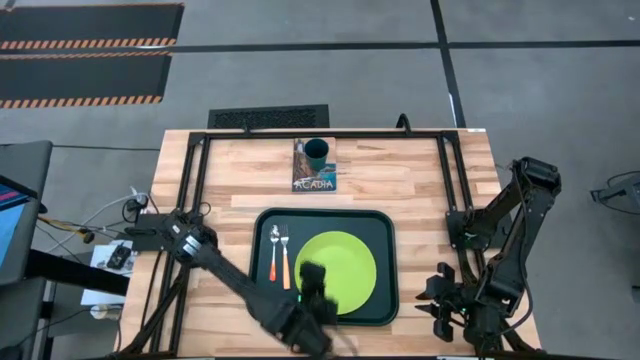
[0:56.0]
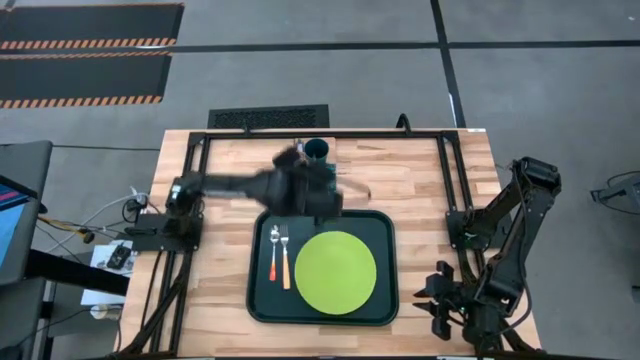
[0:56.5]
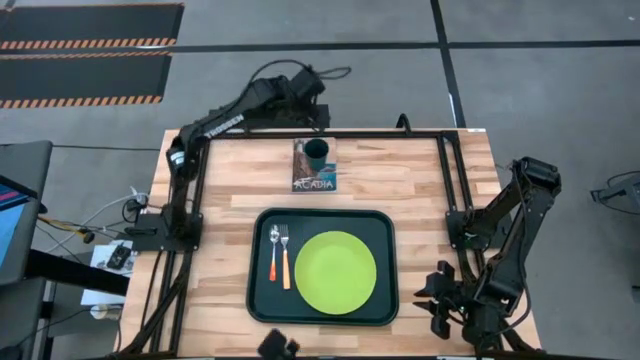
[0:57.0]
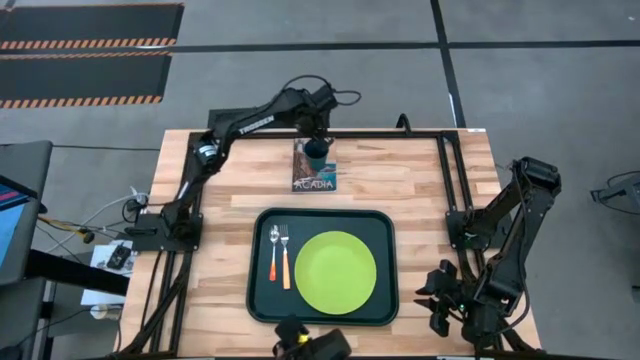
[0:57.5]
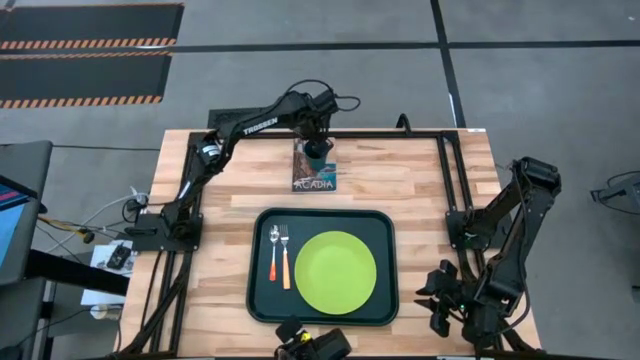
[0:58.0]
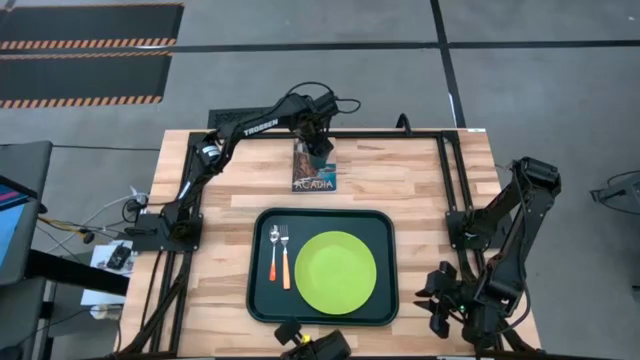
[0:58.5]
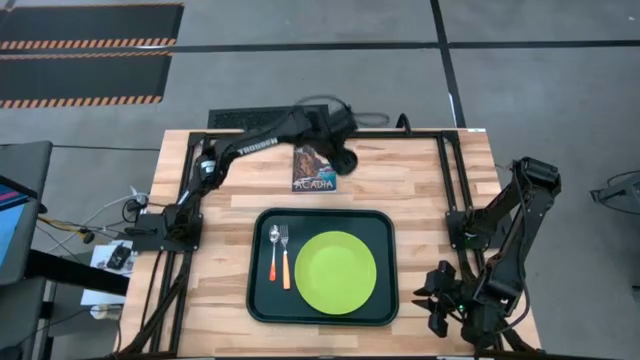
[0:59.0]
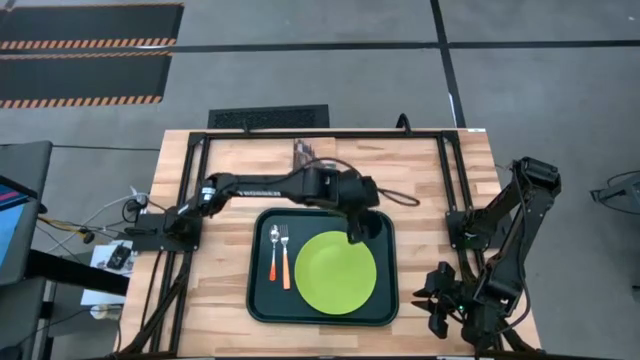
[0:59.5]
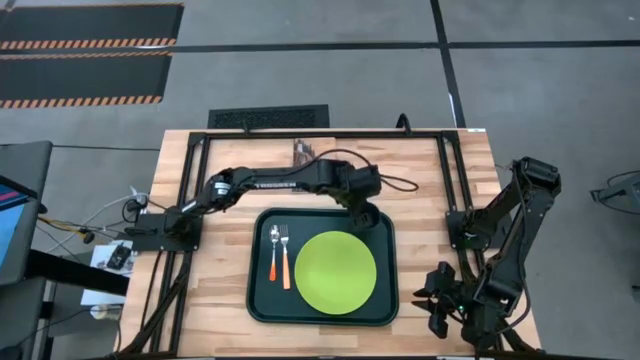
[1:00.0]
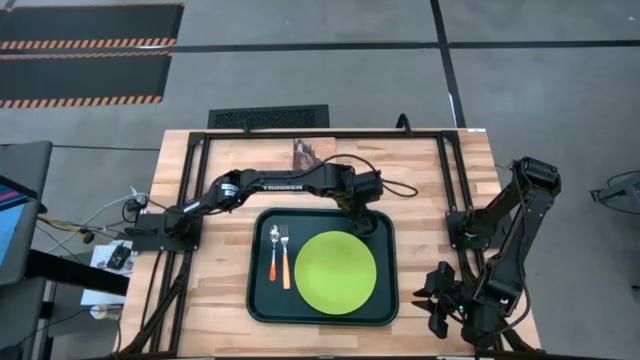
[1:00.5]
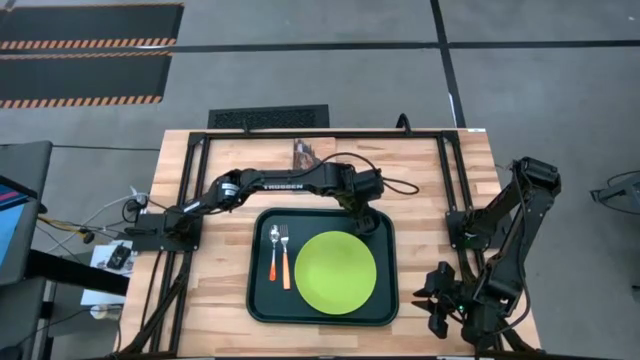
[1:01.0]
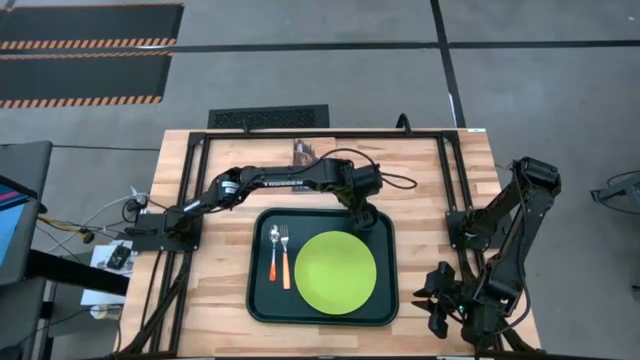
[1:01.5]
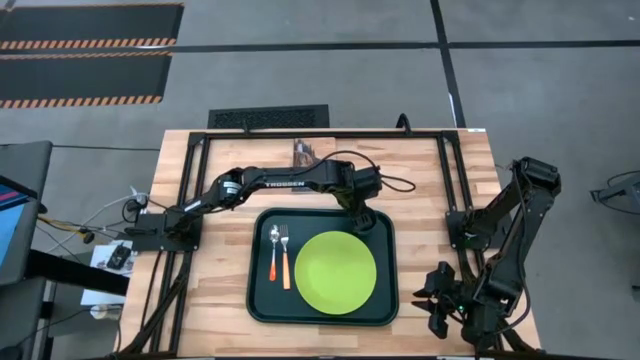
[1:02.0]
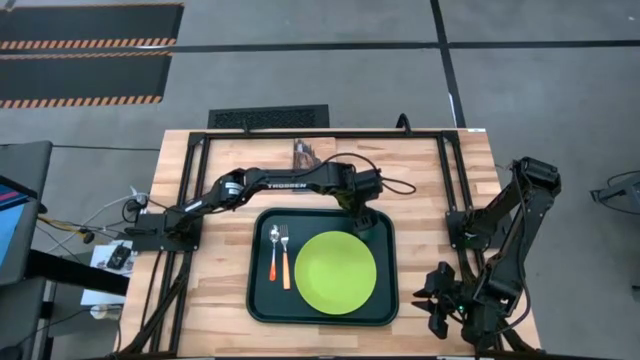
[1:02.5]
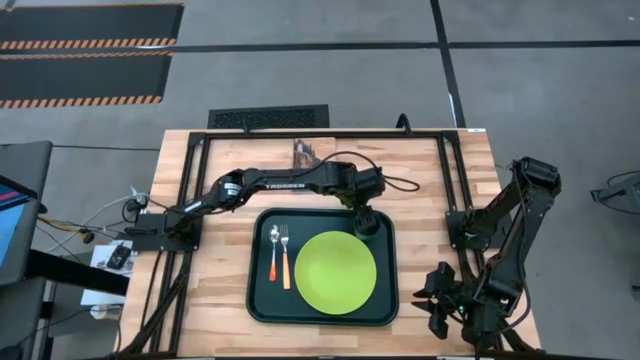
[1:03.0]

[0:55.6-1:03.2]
Task: Pick and place plate/cup/fork/spoon on tray
Put the blue cup on the black tray to the top right of the green plate

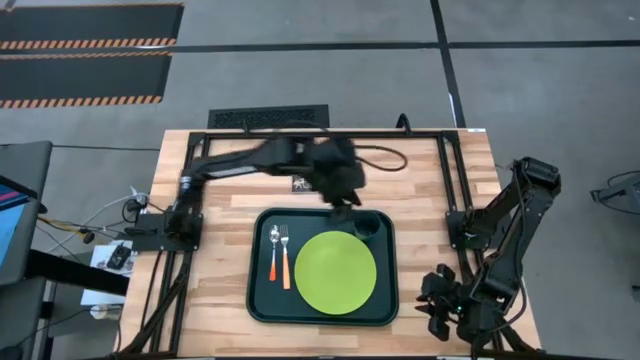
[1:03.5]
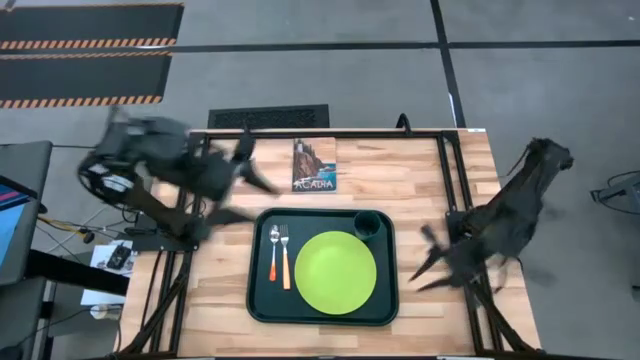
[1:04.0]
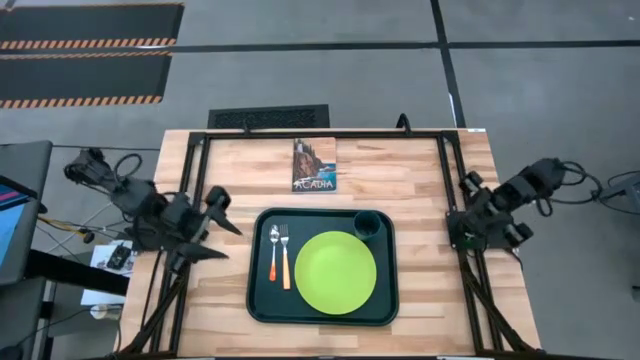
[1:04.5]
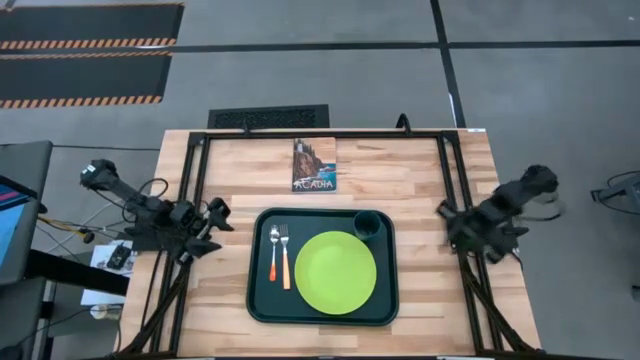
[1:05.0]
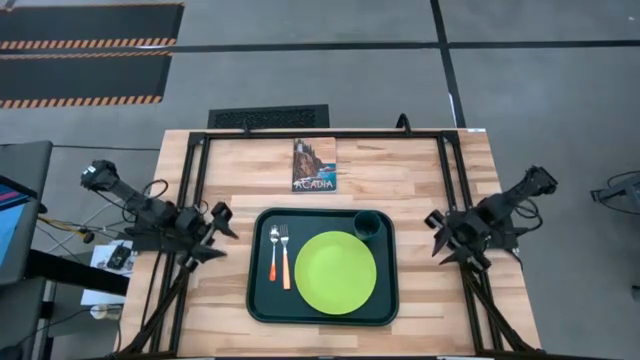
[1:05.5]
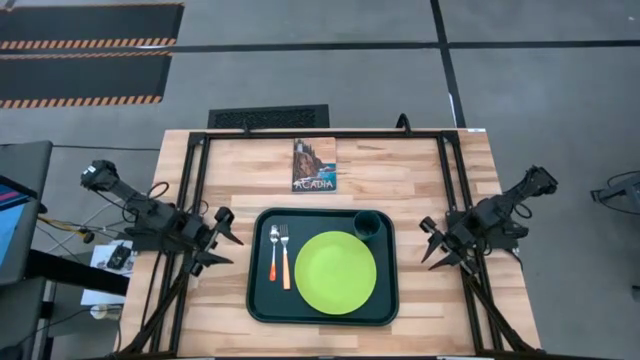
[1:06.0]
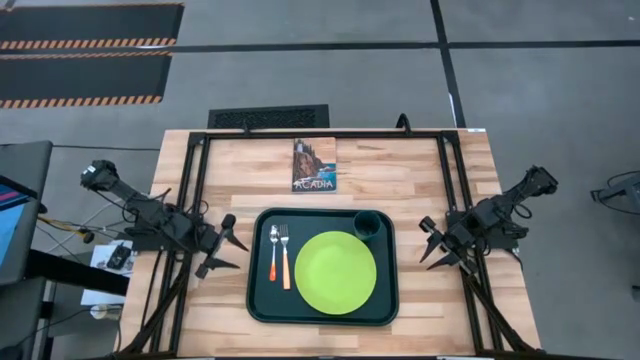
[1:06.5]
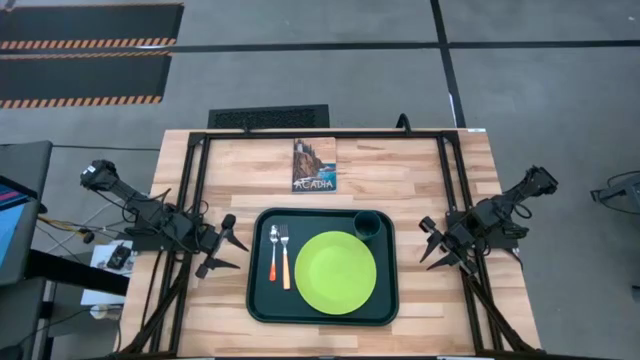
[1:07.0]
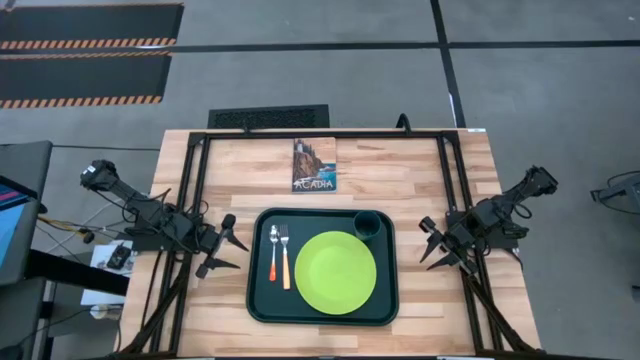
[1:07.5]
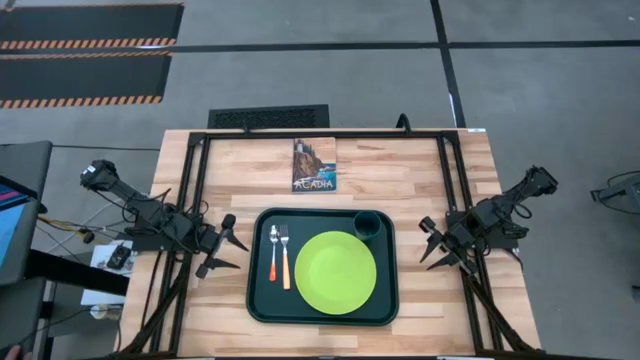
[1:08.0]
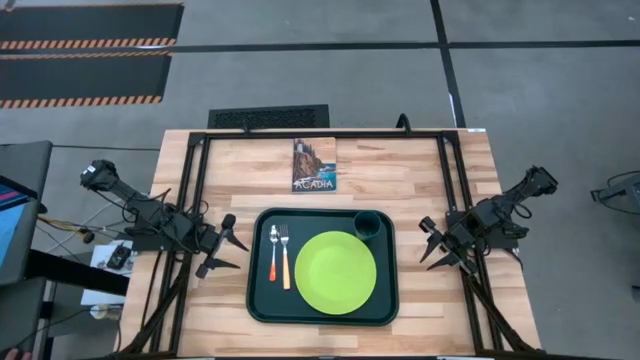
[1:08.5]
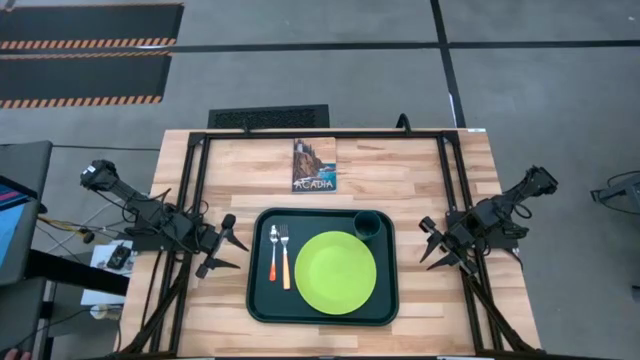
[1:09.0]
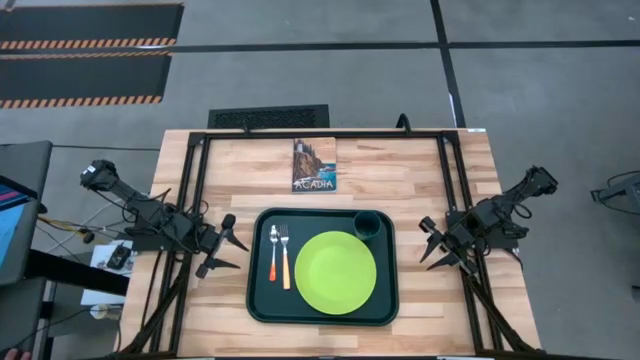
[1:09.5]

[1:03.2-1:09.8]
Return to Home Position
